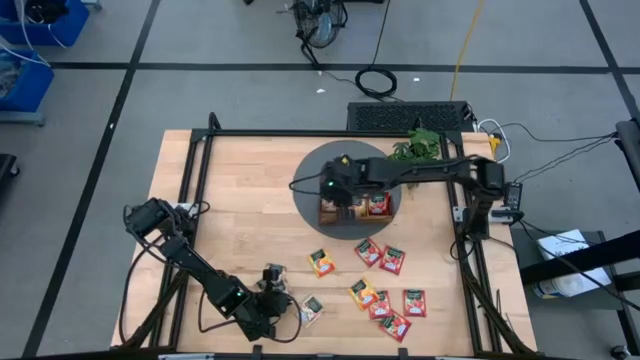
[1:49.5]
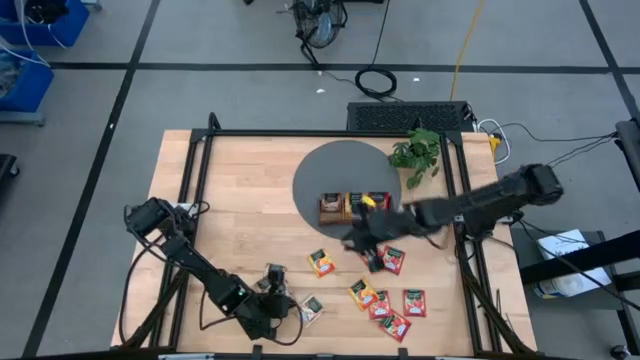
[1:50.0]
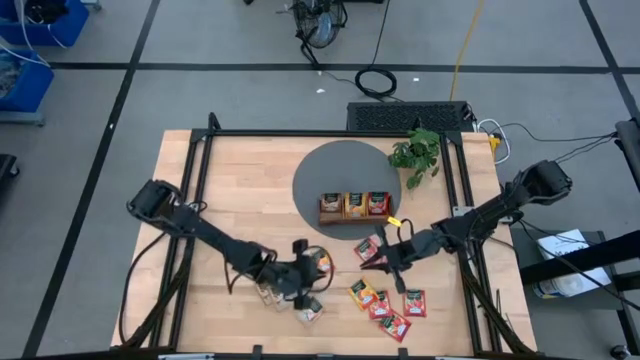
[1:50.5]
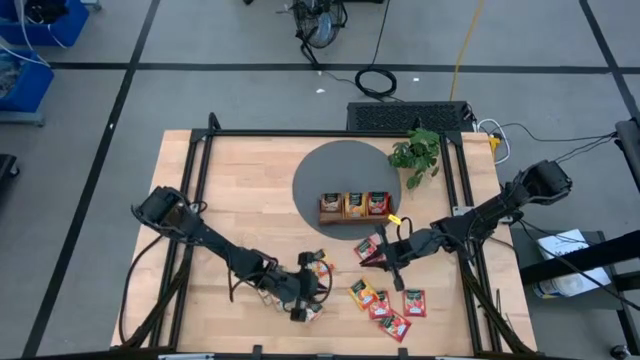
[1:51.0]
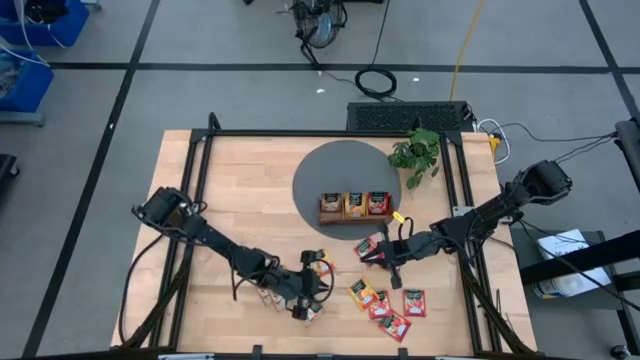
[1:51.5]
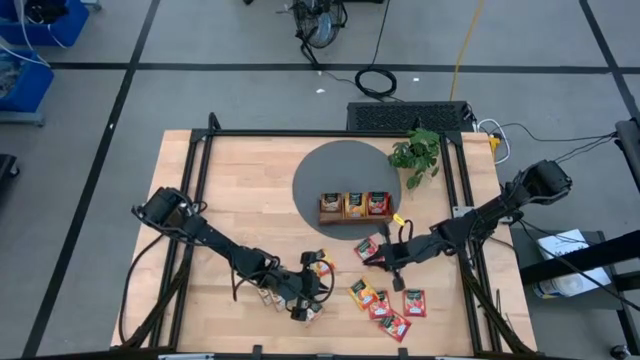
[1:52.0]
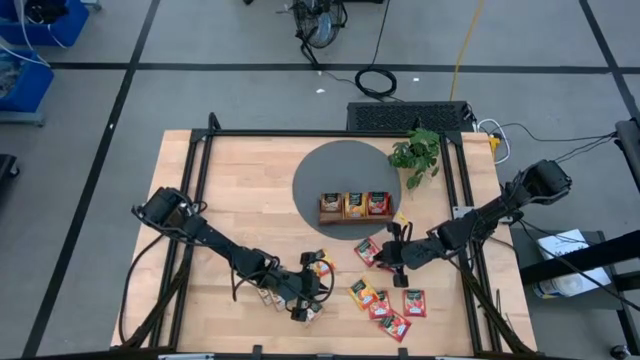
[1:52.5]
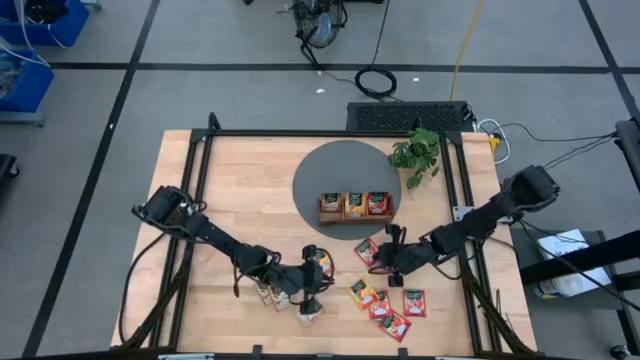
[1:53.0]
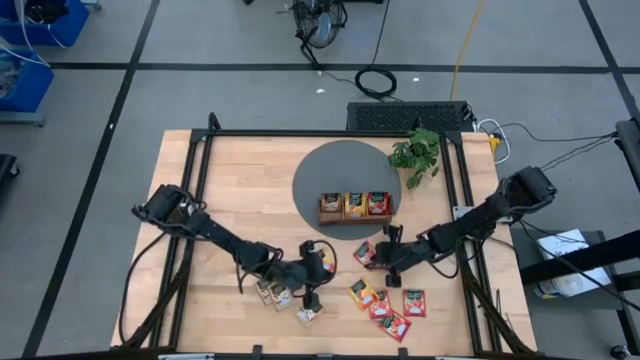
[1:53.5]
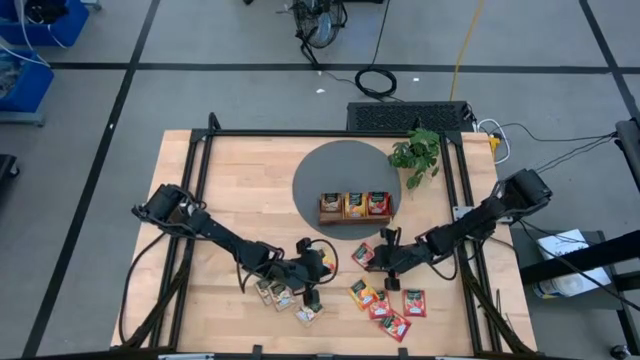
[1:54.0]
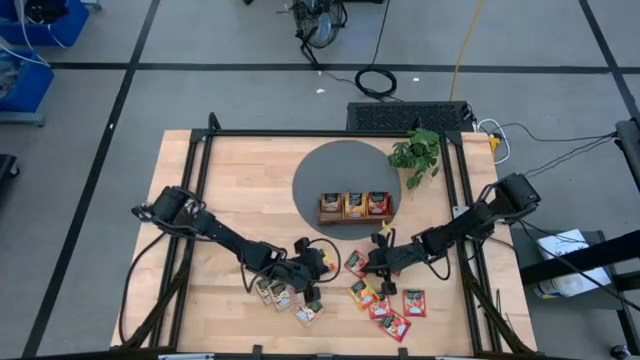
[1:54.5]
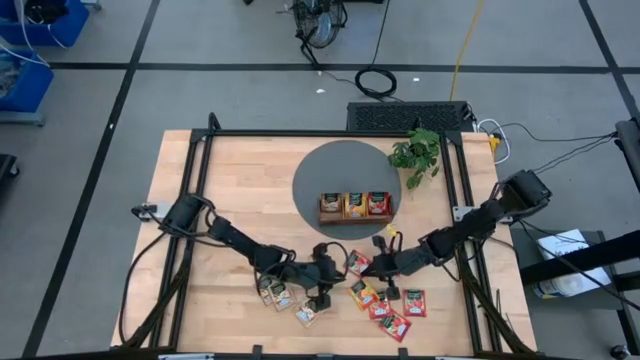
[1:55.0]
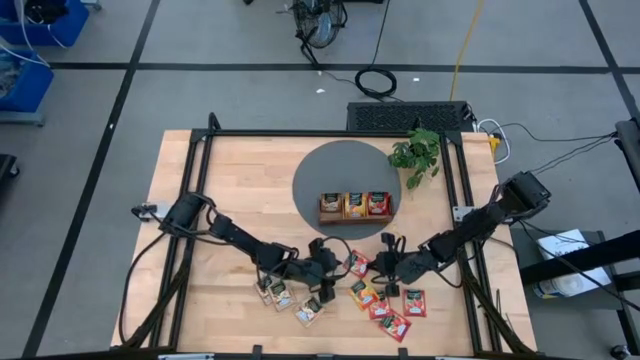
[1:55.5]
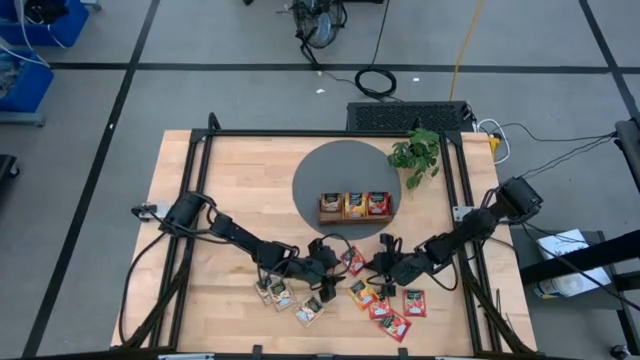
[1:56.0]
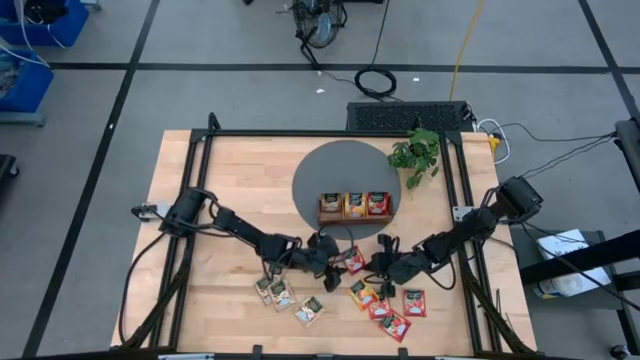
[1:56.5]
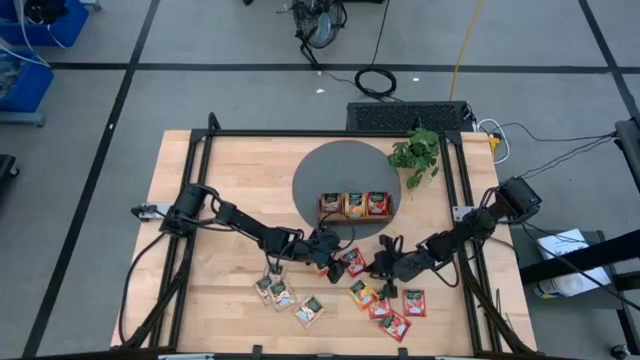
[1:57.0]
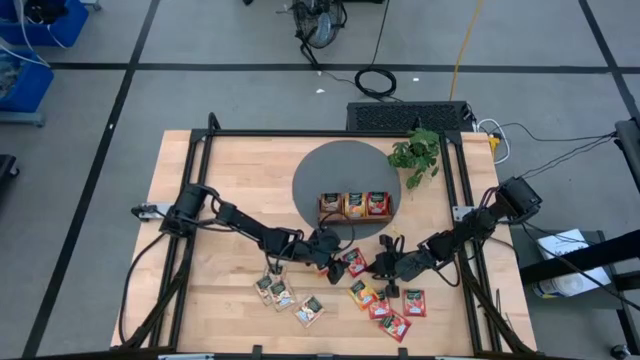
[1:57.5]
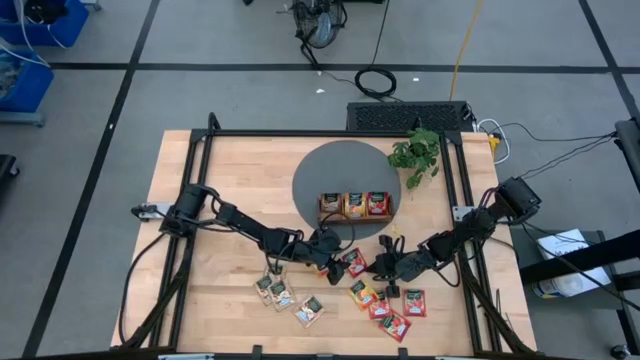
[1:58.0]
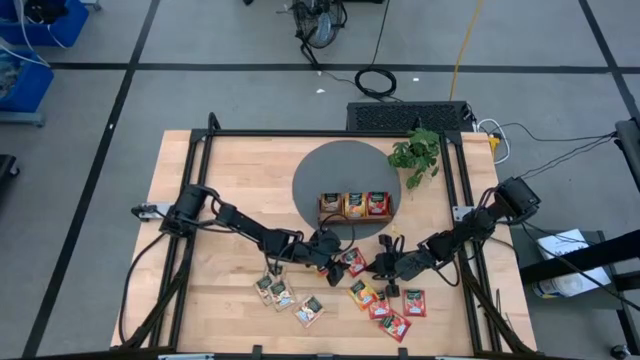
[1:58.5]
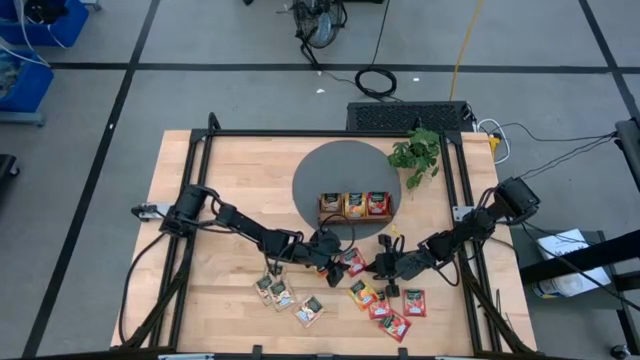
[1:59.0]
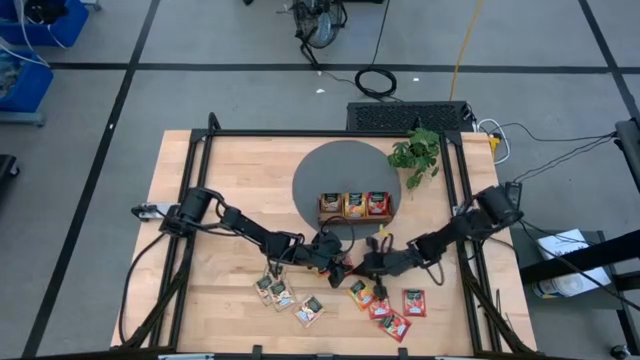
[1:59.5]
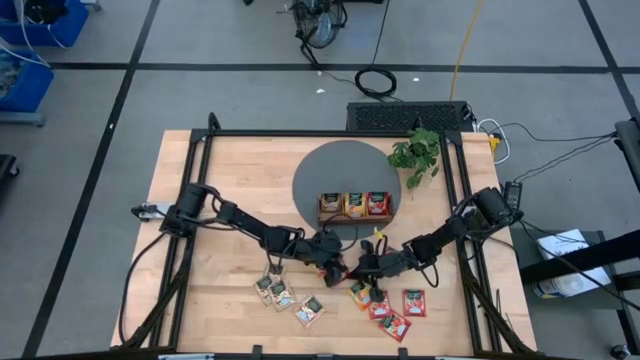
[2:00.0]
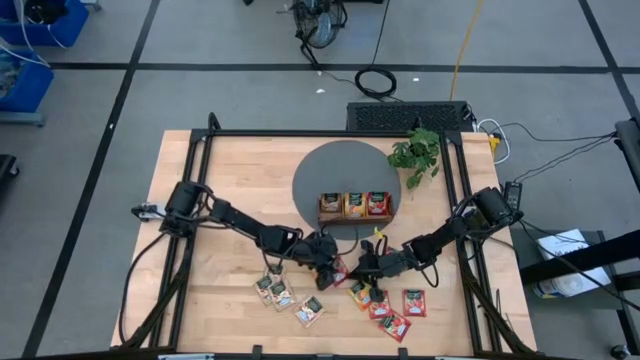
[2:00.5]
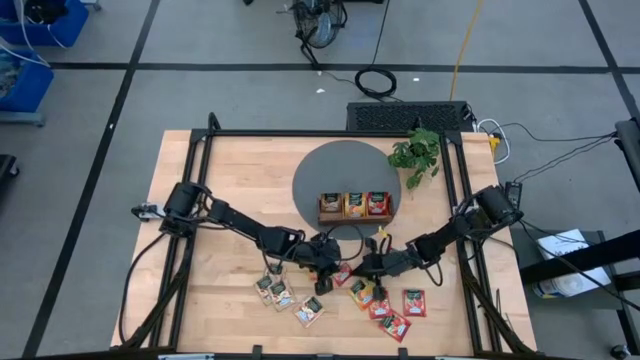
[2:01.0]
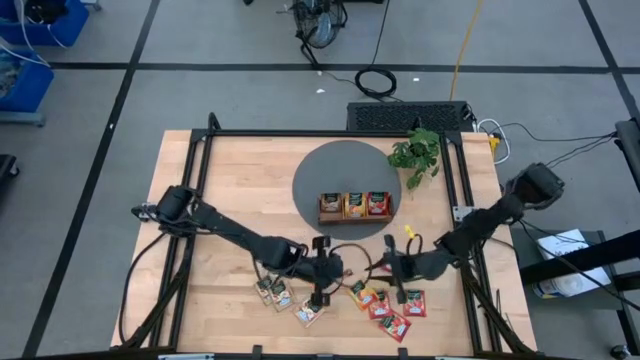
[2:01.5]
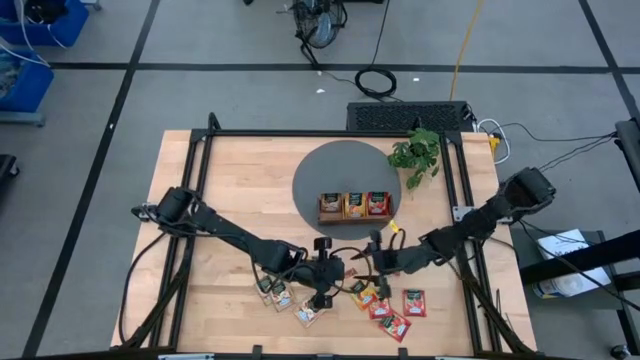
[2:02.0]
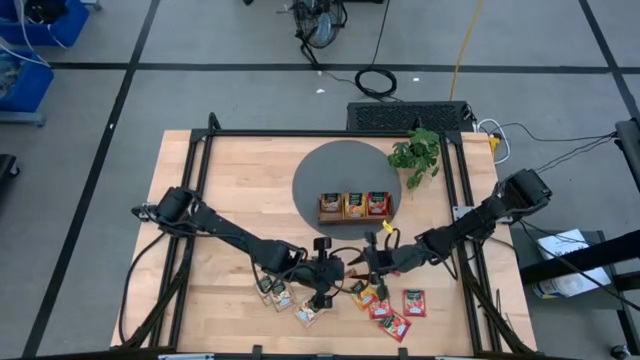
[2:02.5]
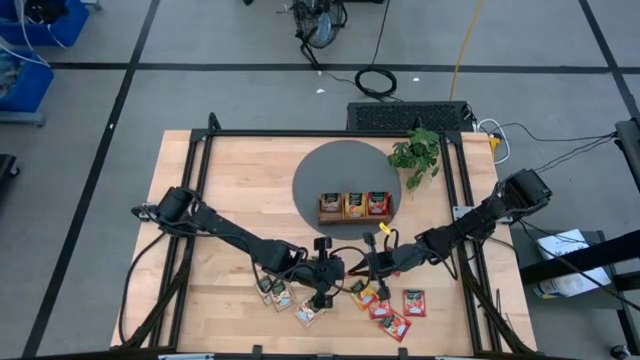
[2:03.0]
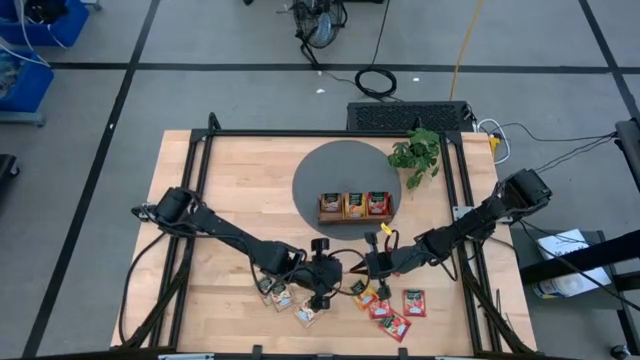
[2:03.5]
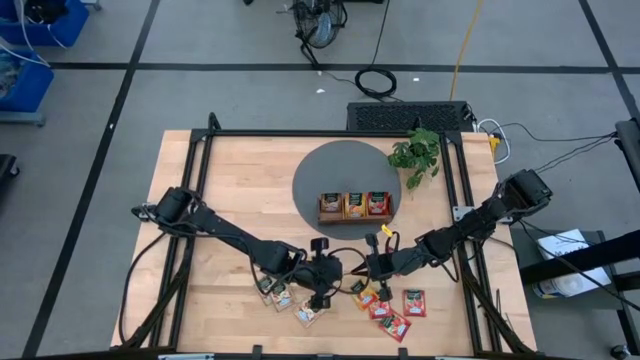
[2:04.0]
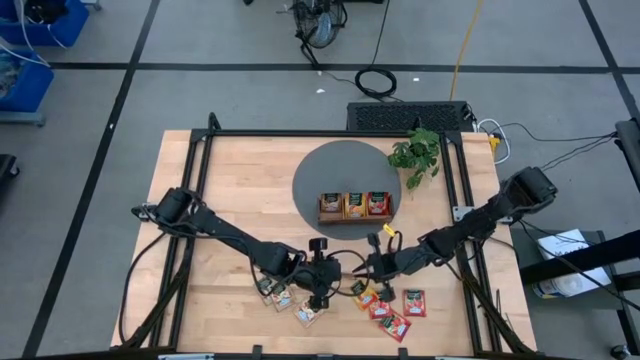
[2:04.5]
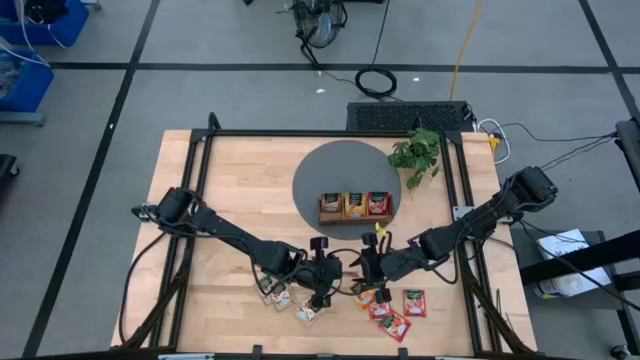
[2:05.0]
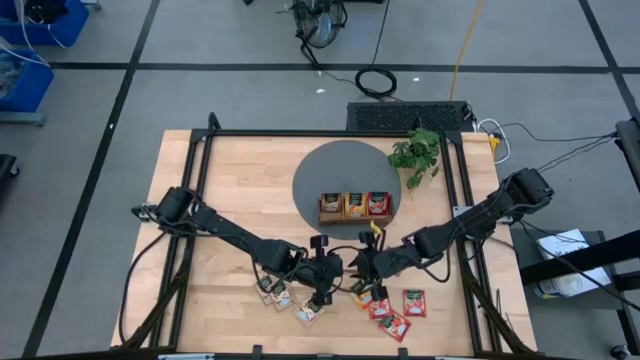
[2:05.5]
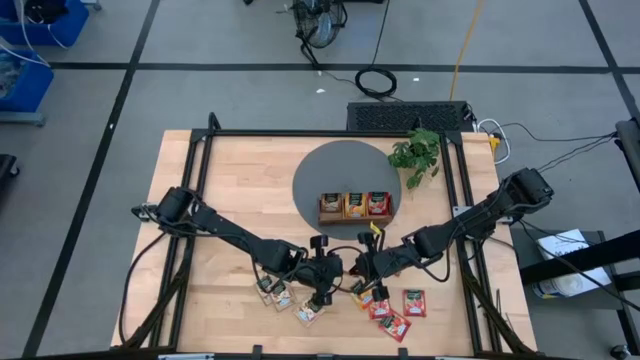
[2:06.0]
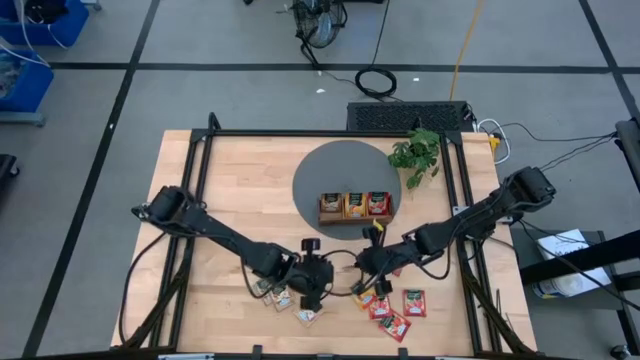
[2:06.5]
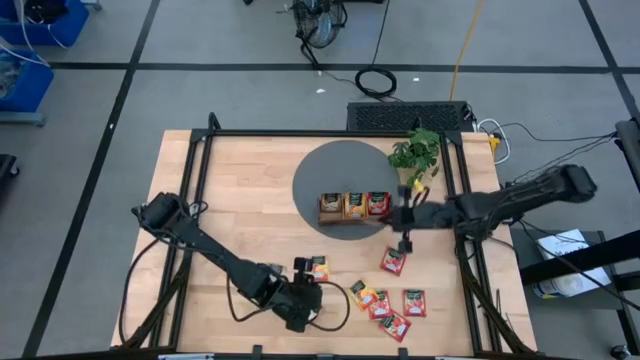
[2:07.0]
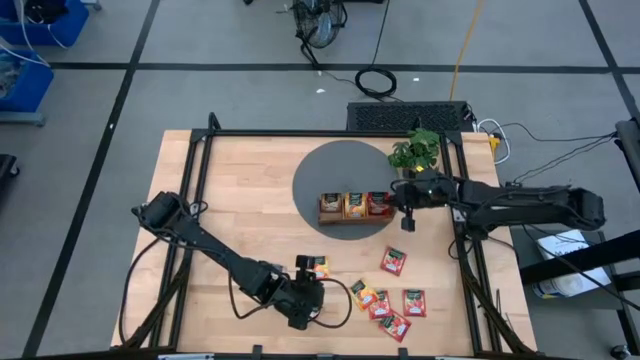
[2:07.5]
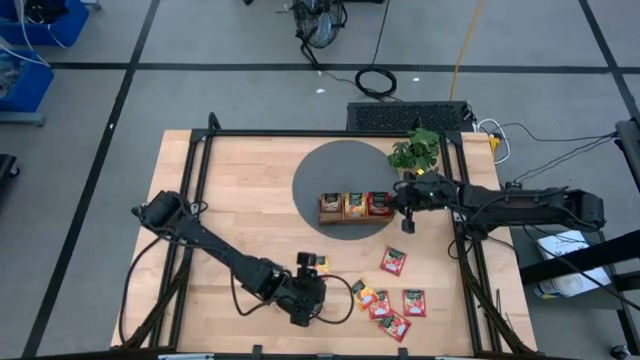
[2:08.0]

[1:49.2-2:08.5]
Task: Pick & Place Tea
Put the red tea bag into the right section of the wooden organizer

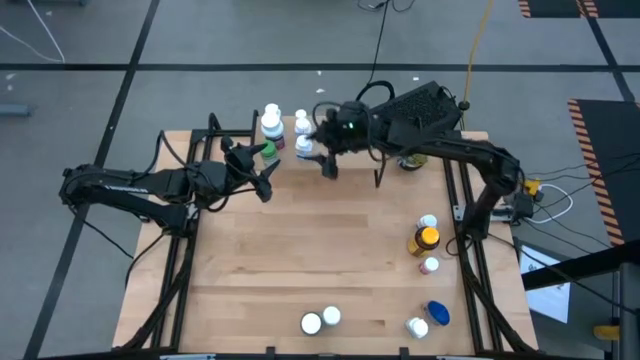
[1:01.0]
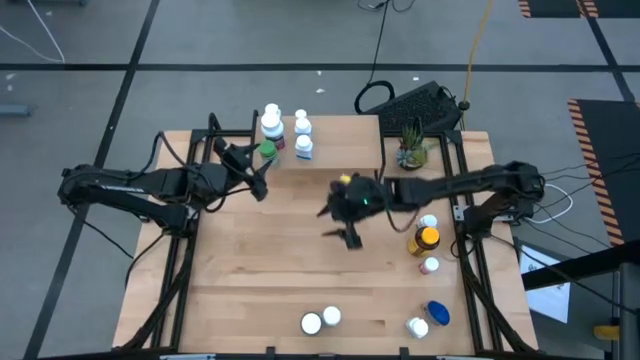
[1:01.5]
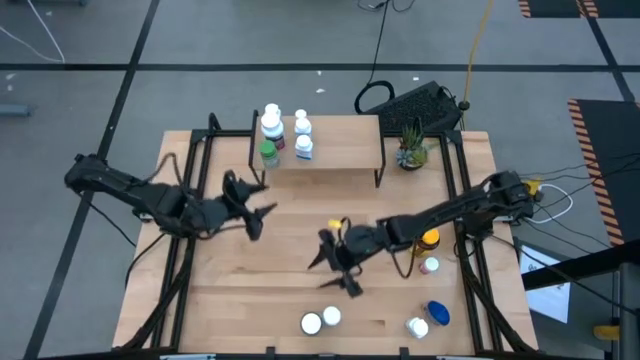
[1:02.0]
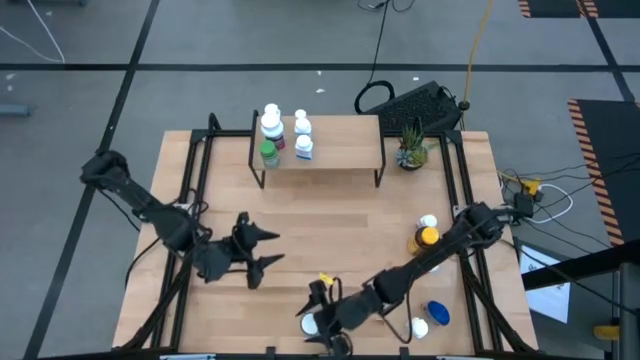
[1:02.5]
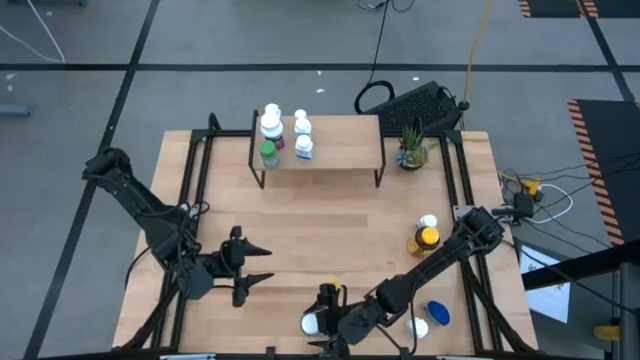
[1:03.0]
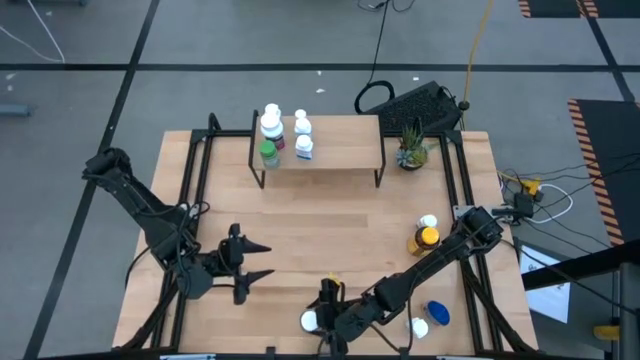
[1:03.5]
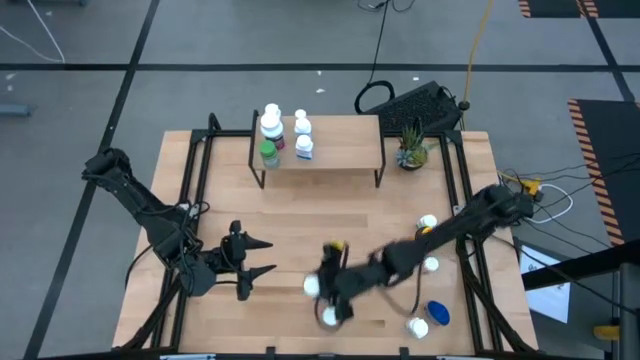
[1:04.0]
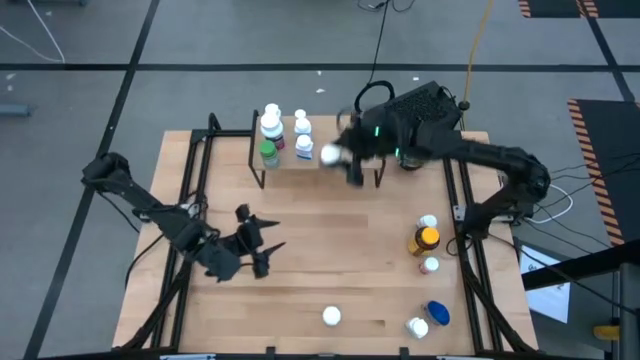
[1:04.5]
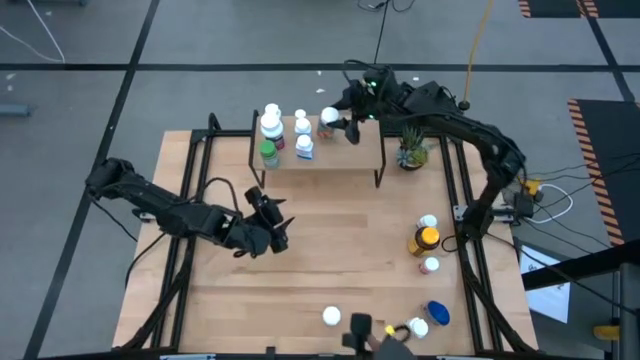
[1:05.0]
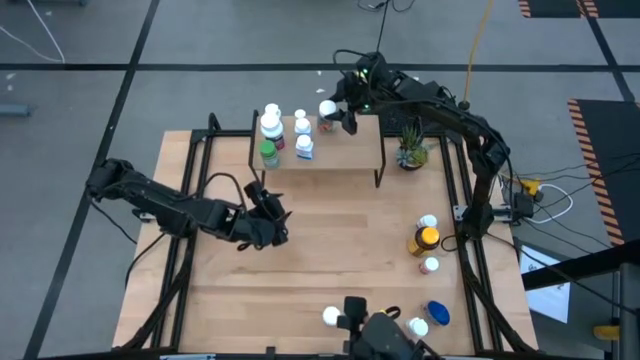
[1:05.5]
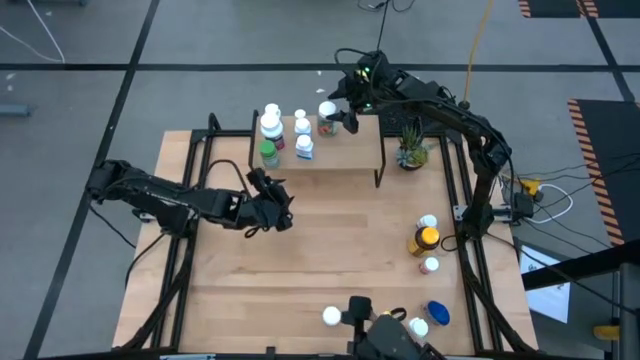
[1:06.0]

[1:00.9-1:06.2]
Task: Pick and place medicine bottles onto shelf by color
Put the green pill bottle on the top shelf
